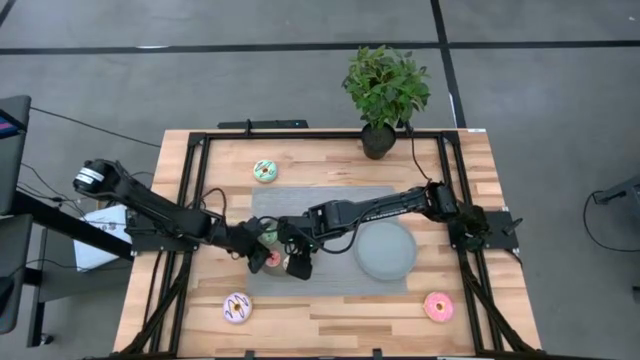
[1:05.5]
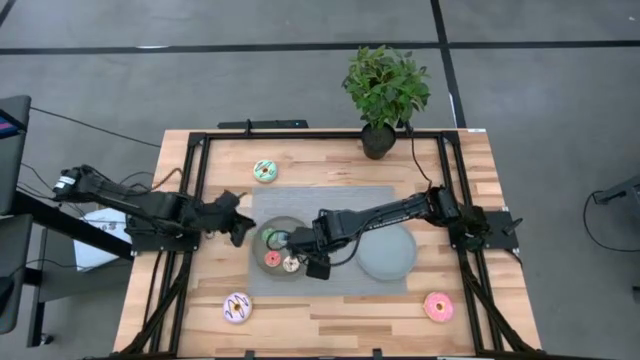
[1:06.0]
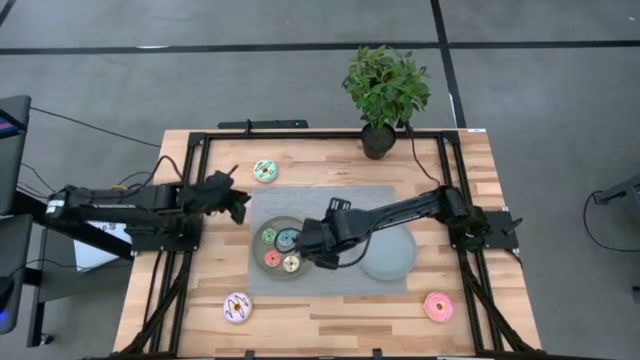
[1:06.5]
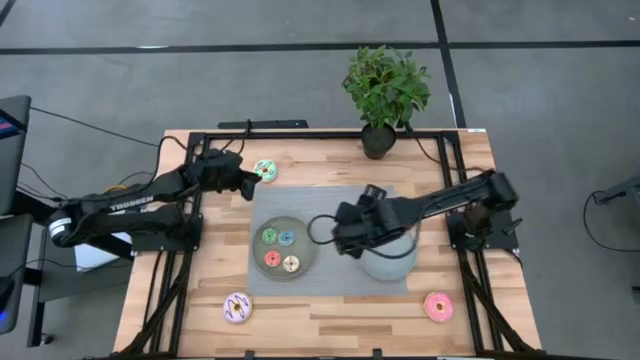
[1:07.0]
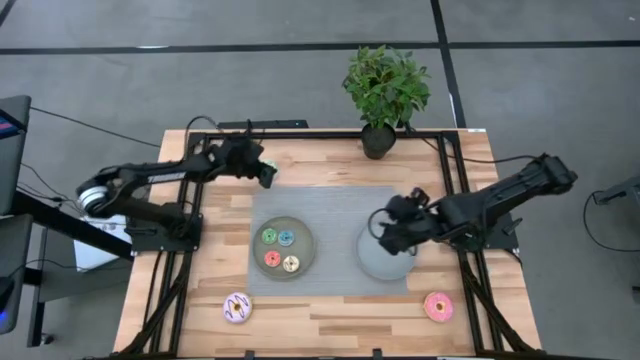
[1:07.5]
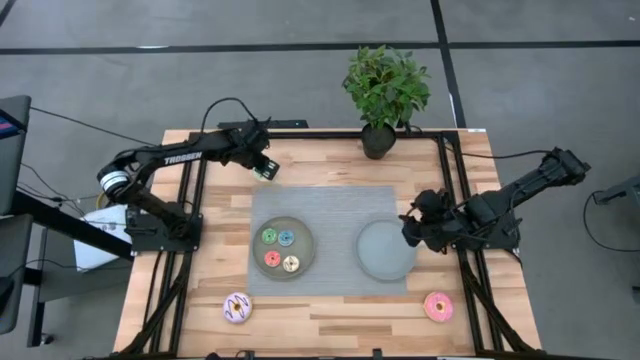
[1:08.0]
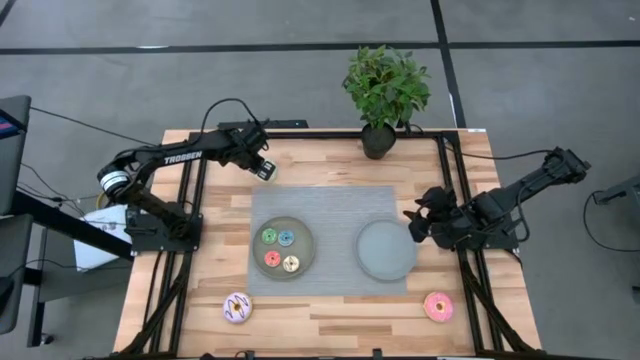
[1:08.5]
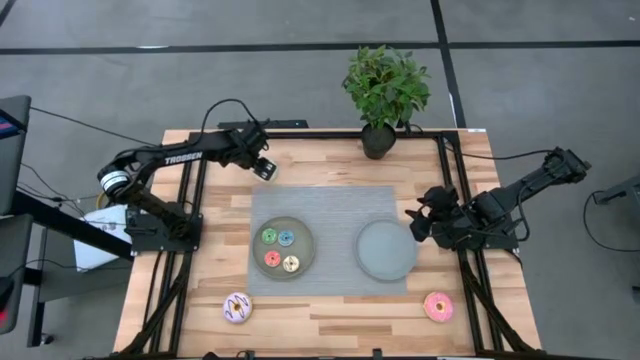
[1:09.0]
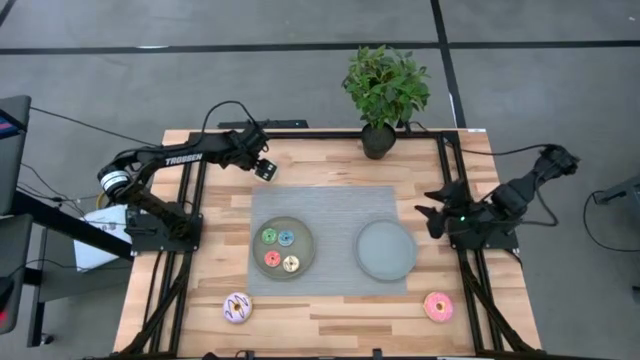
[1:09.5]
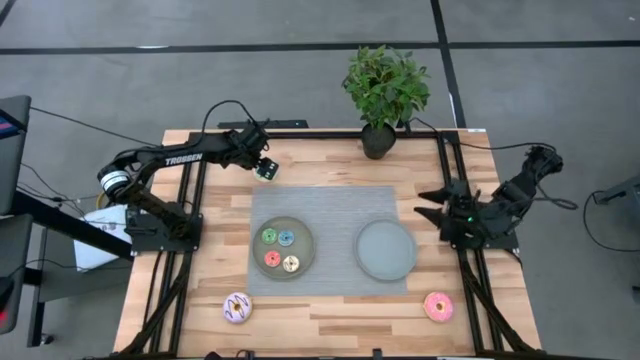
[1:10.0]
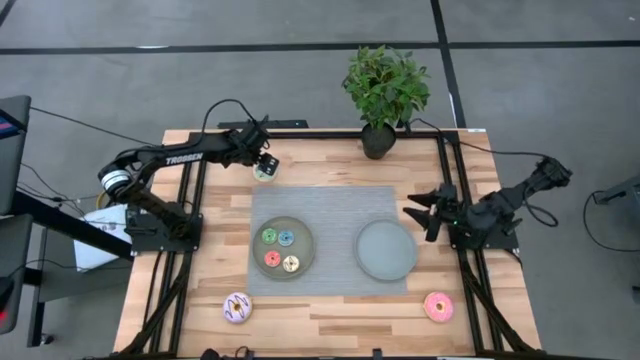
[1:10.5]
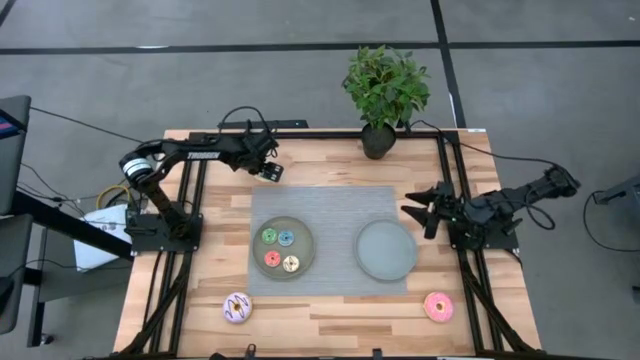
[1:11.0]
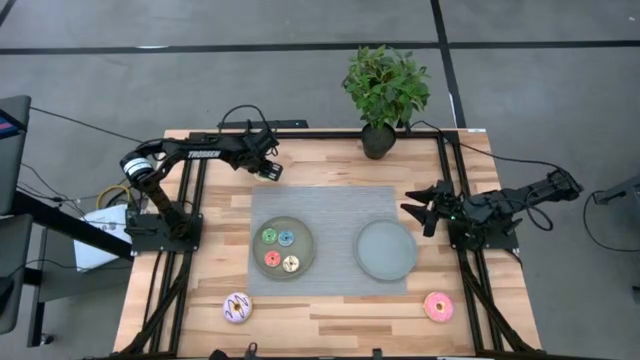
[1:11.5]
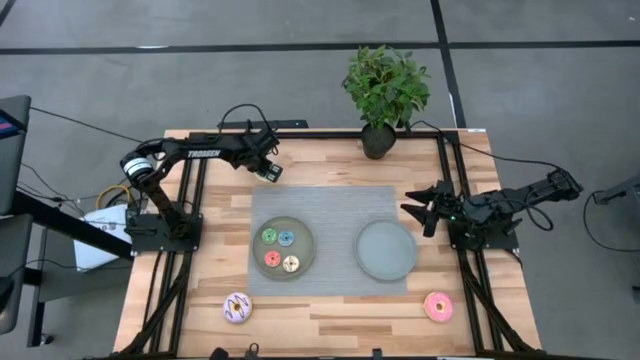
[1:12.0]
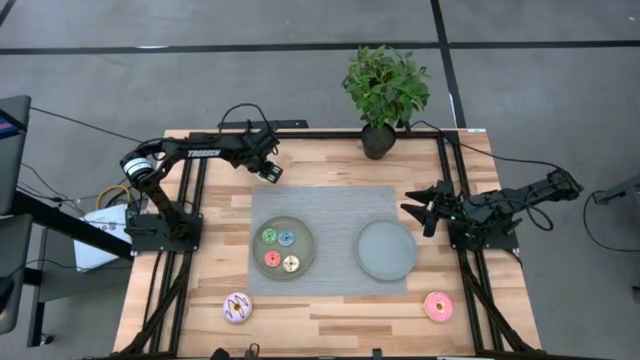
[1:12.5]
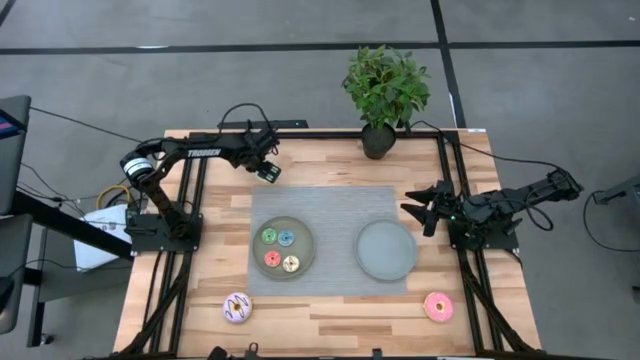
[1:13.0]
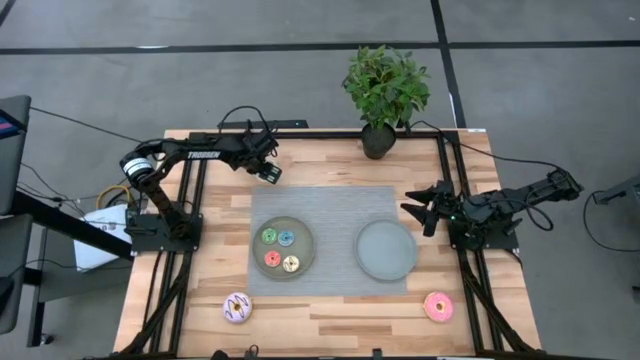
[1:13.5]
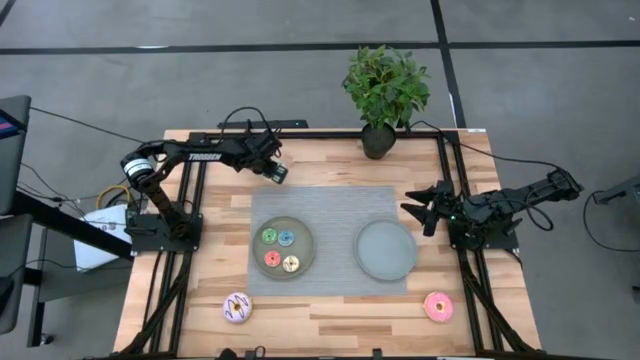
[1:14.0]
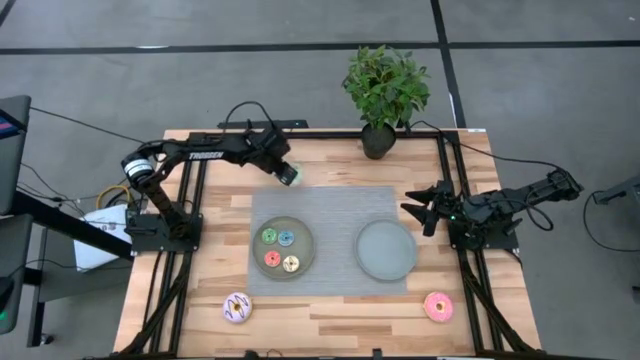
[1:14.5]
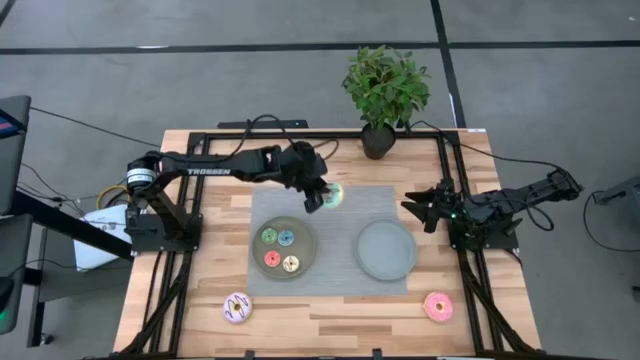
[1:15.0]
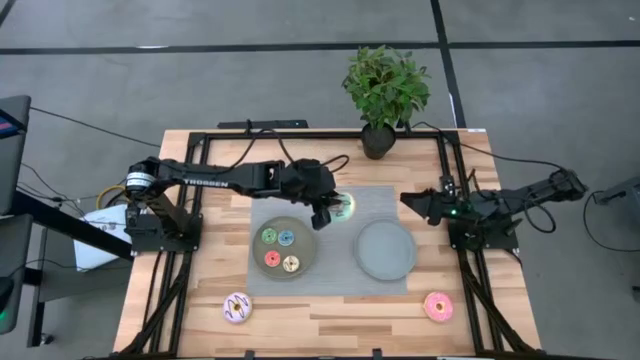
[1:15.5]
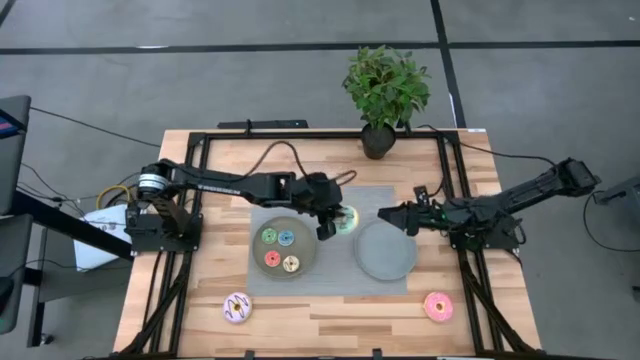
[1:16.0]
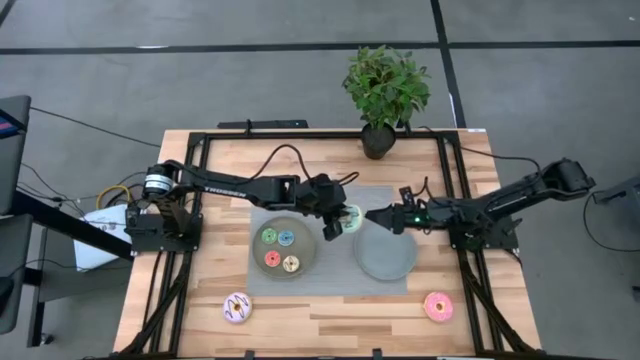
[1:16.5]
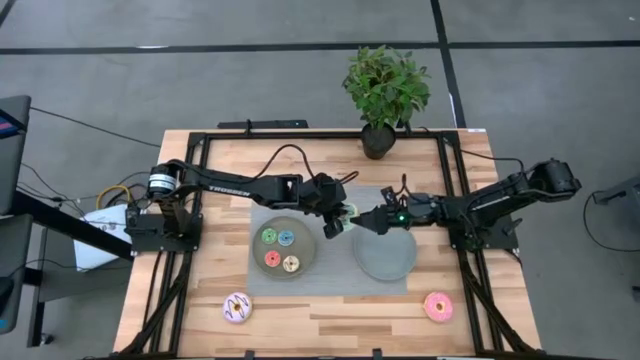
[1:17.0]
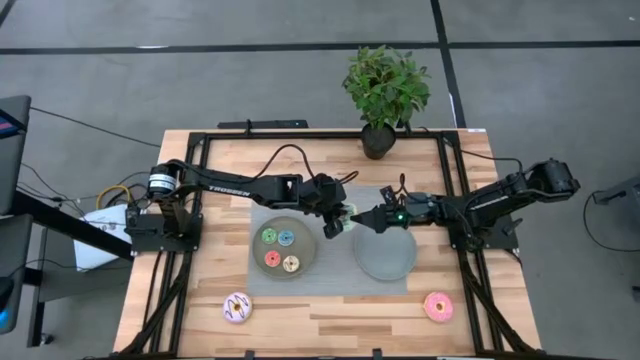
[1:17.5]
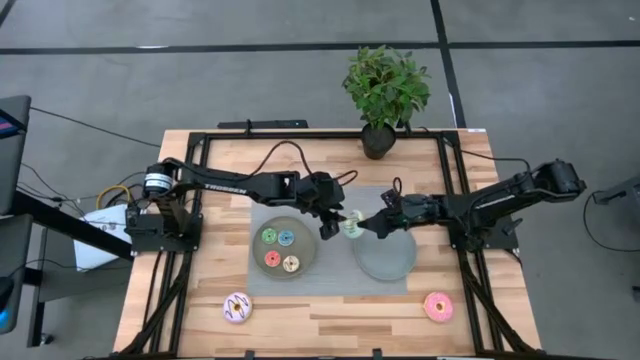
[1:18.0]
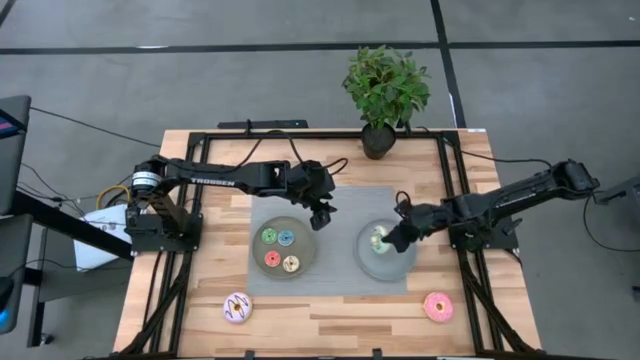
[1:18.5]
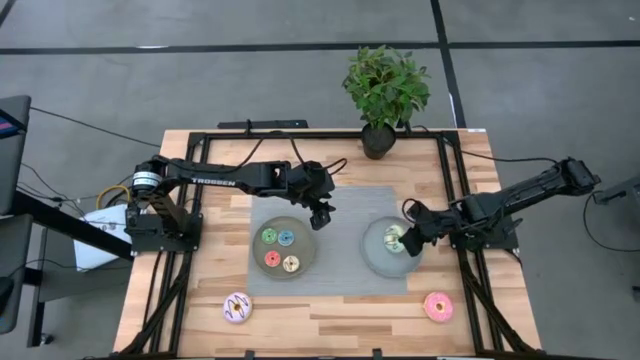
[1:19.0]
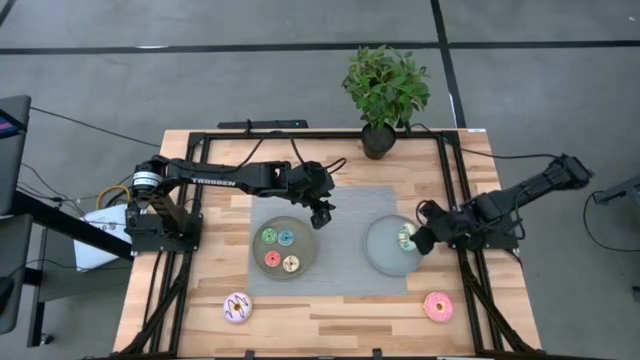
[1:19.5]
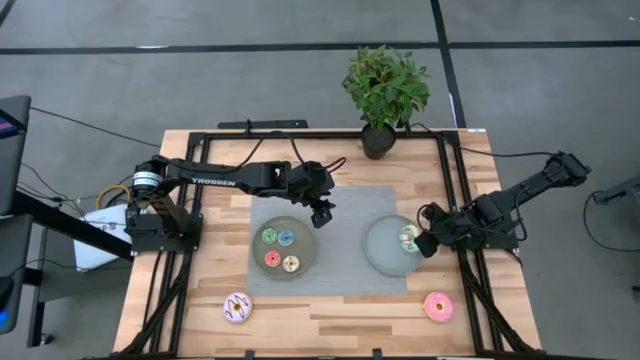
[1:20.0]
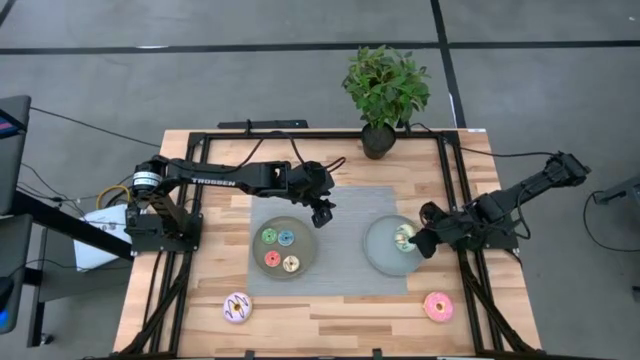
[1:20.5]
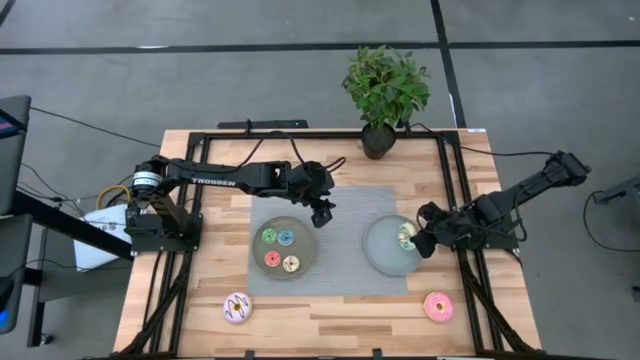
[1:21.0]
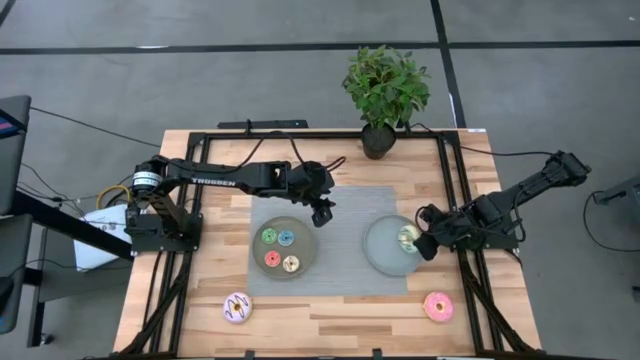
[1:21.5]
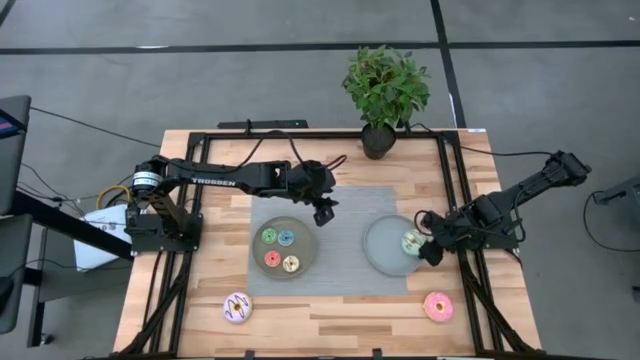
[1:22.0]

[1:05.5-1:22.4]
Task: Pick & Place donuts
Put the large blue donut on the gray plate

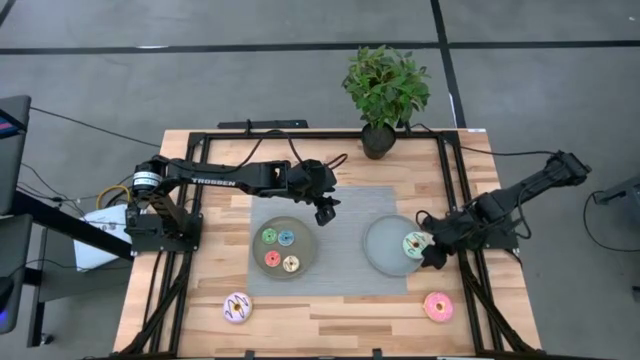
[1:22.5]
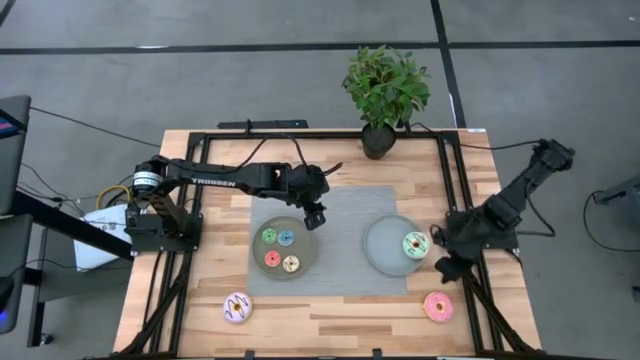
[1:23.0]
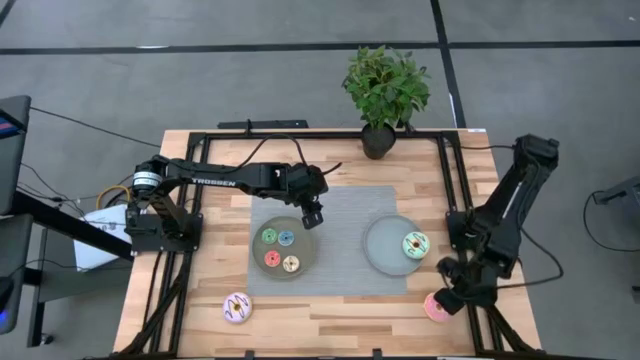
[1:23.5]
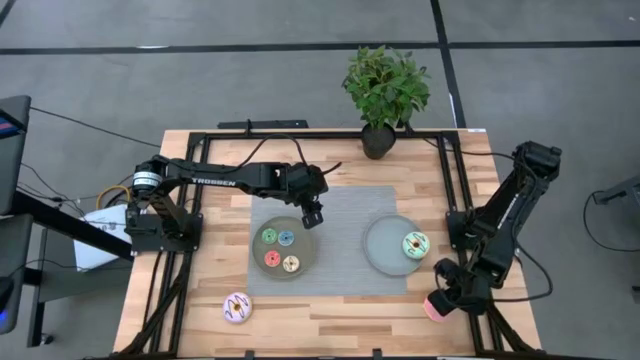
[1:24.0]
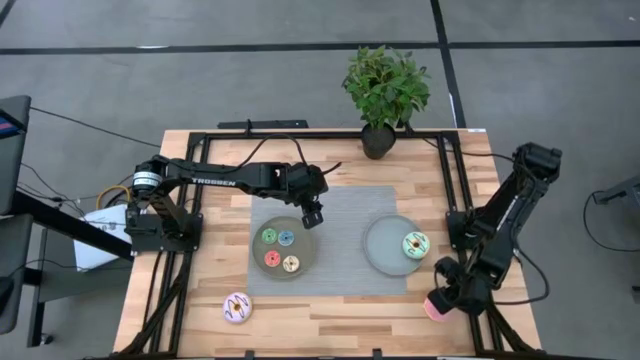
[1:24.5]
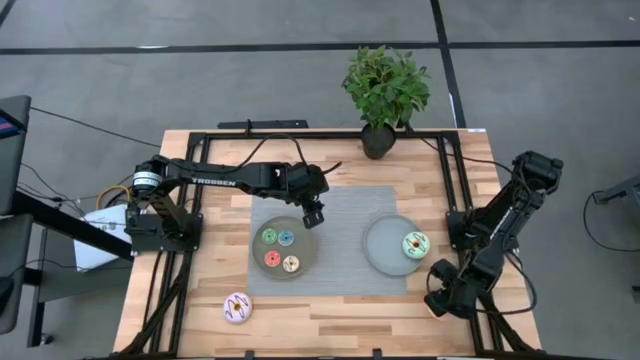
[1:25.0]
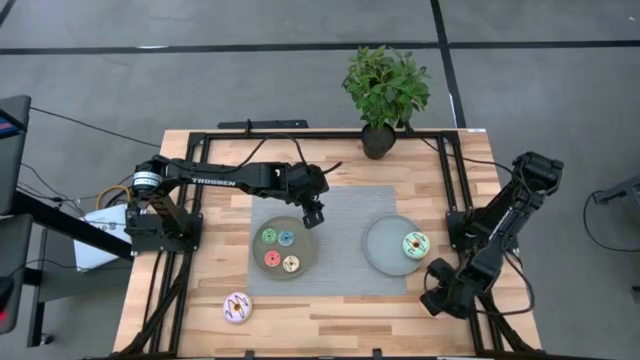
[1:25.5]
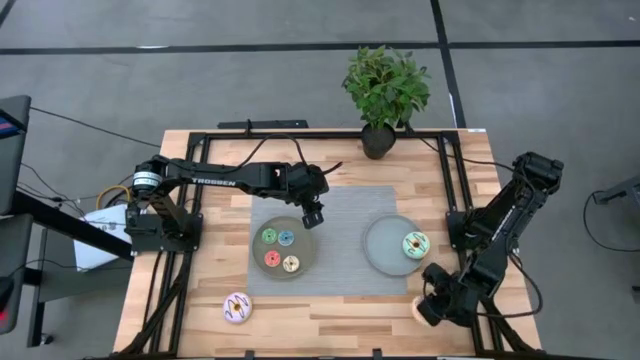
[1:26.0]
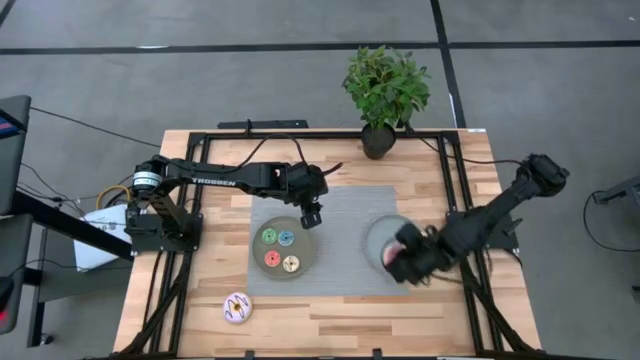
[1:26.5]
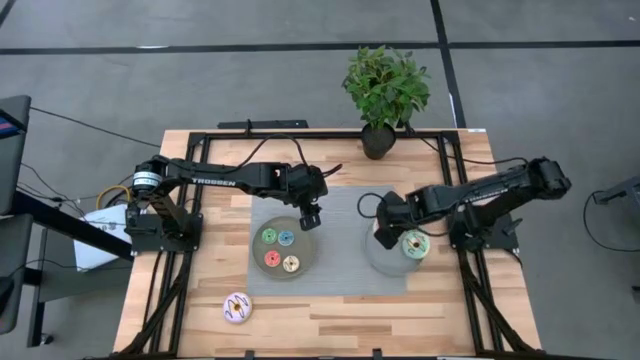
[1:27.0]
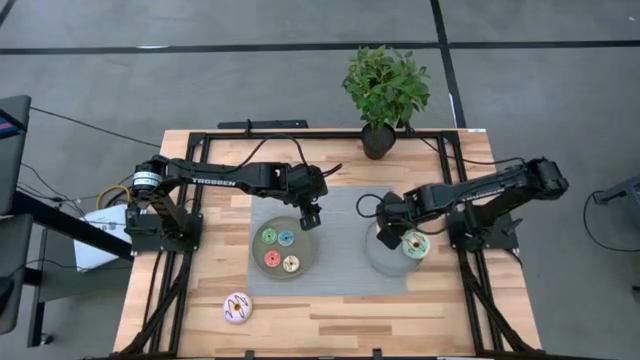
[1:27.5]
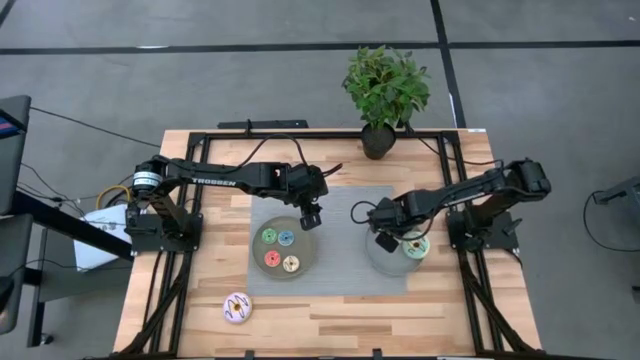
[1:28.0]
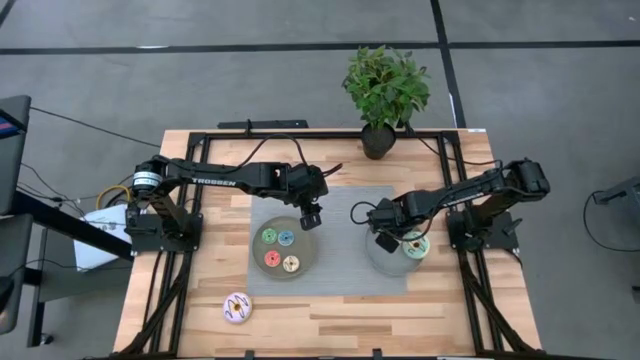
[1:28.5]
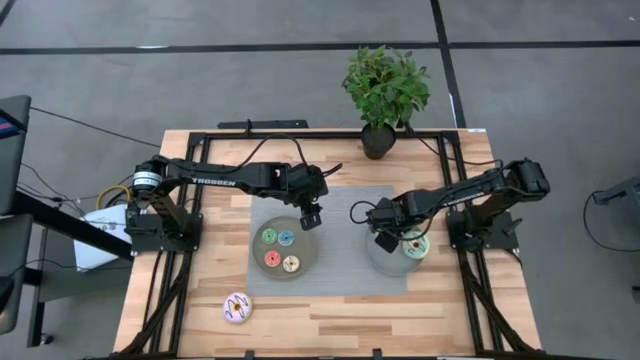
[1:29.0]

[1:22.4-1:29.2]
Put the large pink donut on the gray plate
